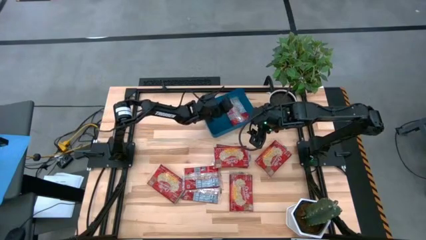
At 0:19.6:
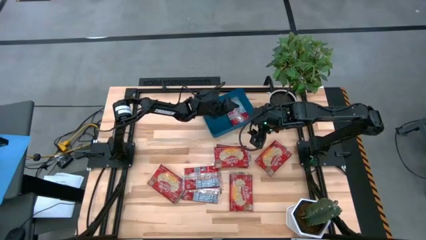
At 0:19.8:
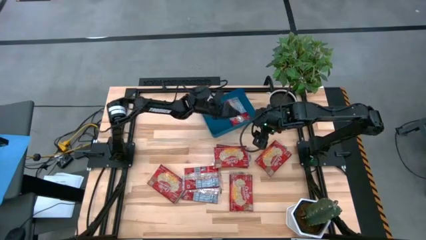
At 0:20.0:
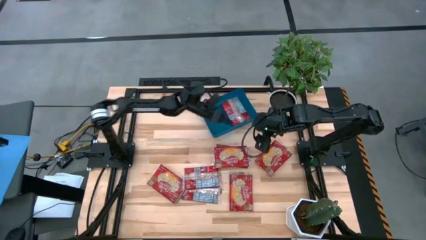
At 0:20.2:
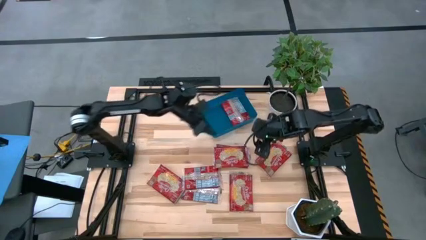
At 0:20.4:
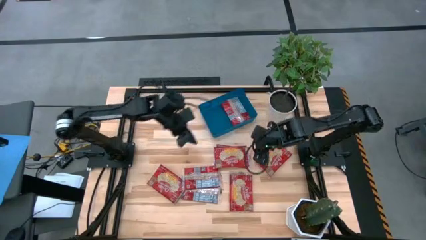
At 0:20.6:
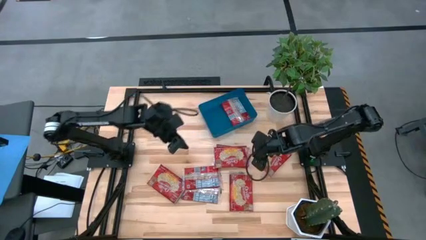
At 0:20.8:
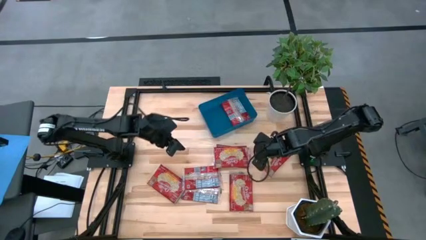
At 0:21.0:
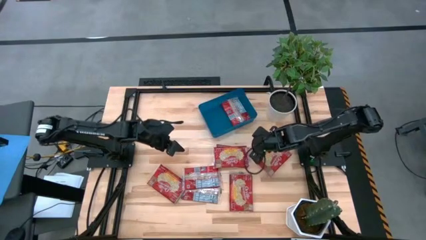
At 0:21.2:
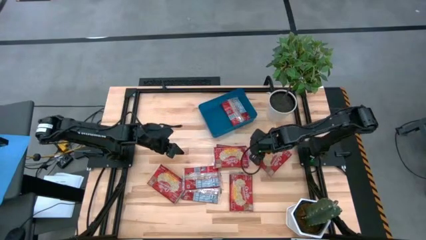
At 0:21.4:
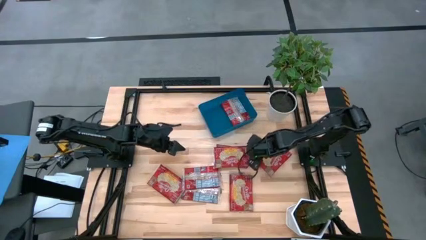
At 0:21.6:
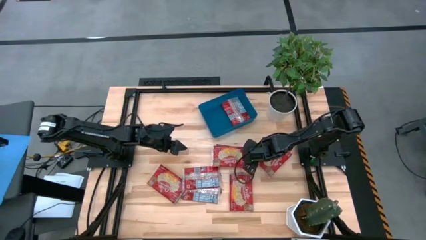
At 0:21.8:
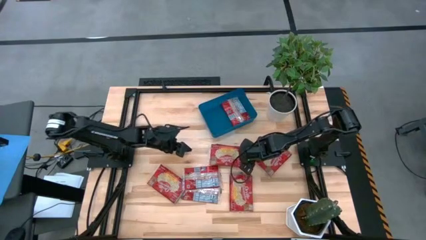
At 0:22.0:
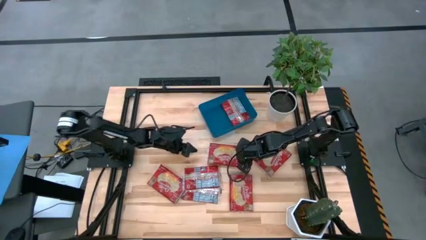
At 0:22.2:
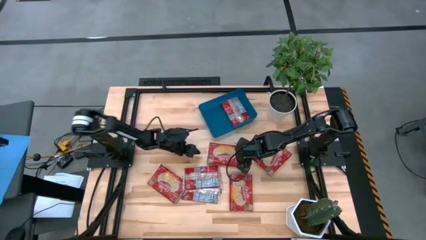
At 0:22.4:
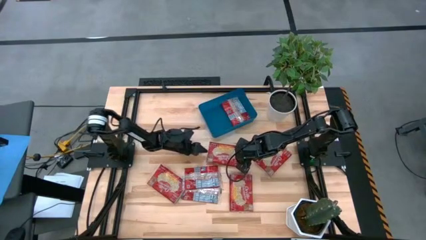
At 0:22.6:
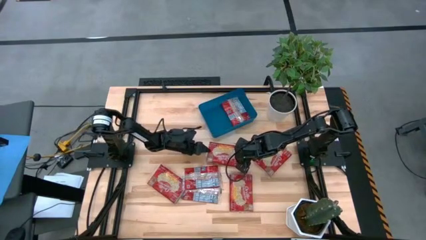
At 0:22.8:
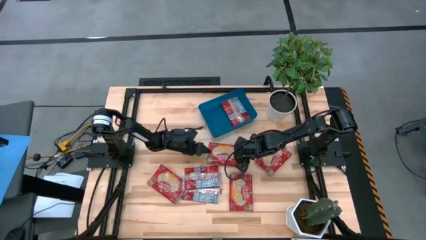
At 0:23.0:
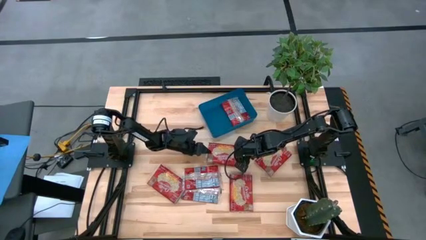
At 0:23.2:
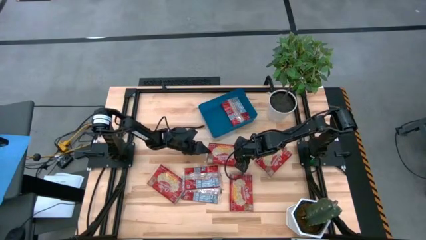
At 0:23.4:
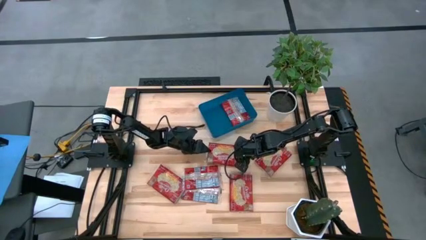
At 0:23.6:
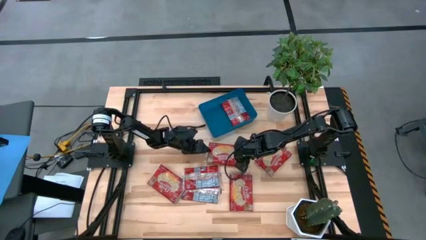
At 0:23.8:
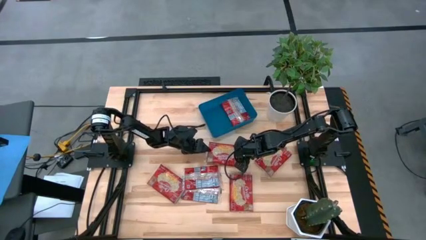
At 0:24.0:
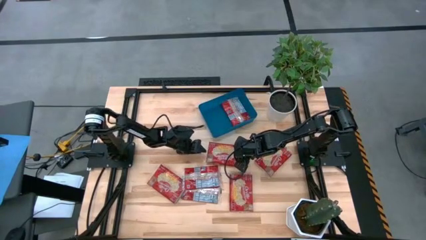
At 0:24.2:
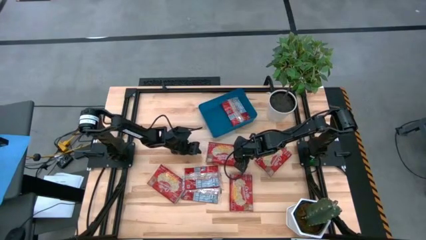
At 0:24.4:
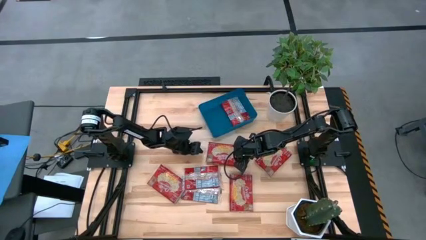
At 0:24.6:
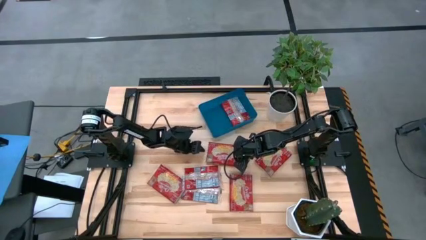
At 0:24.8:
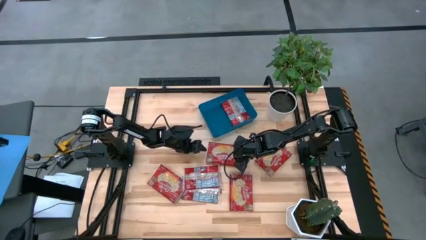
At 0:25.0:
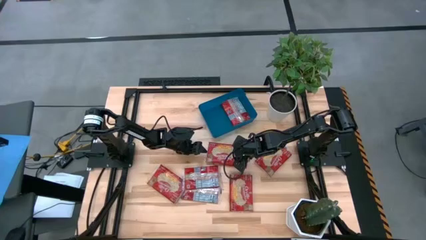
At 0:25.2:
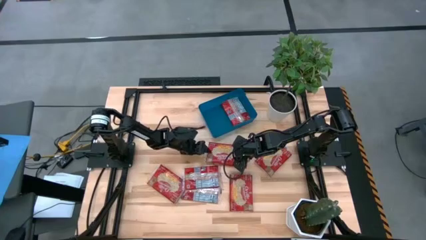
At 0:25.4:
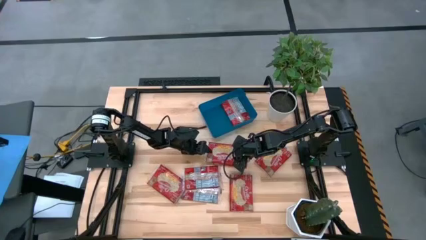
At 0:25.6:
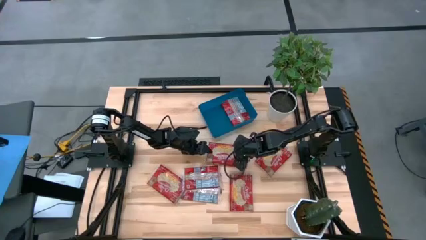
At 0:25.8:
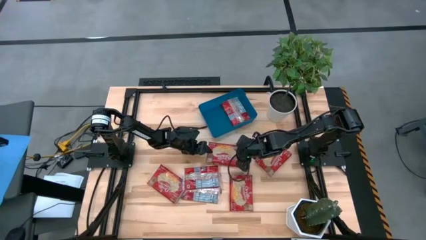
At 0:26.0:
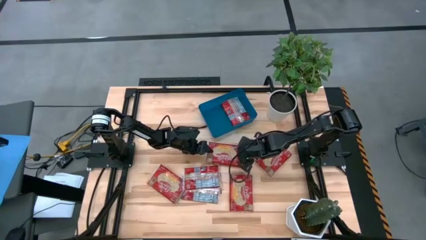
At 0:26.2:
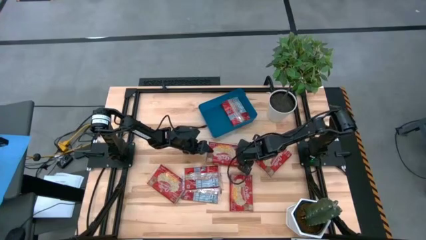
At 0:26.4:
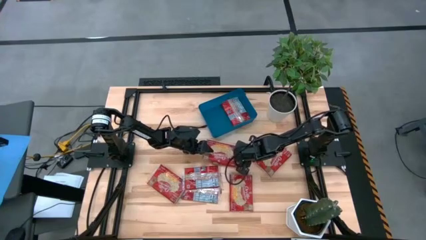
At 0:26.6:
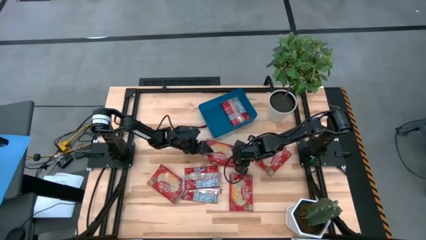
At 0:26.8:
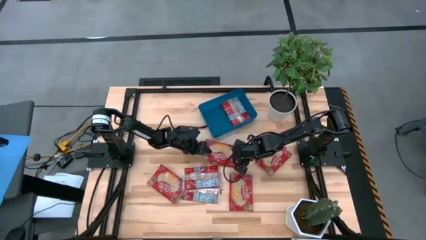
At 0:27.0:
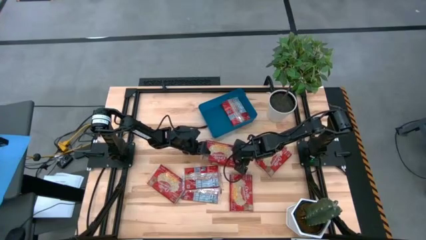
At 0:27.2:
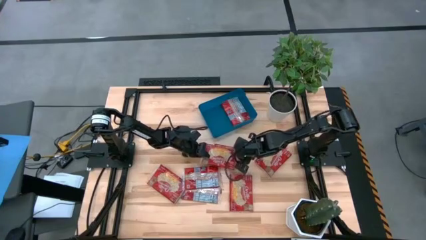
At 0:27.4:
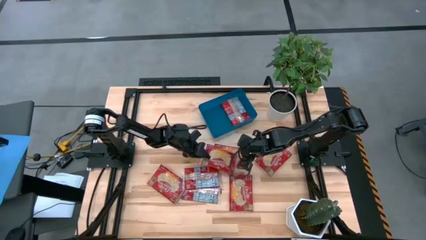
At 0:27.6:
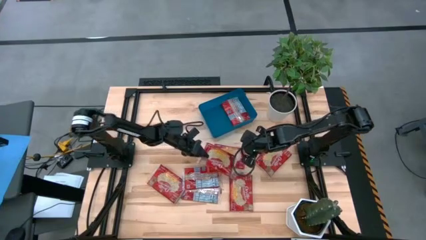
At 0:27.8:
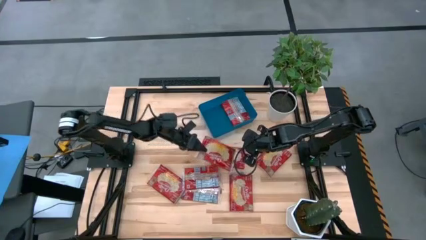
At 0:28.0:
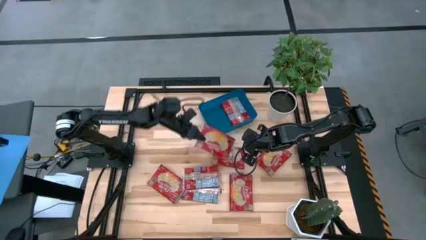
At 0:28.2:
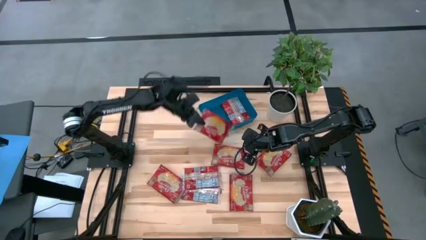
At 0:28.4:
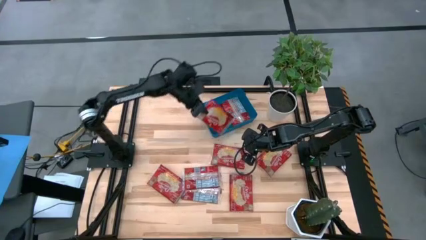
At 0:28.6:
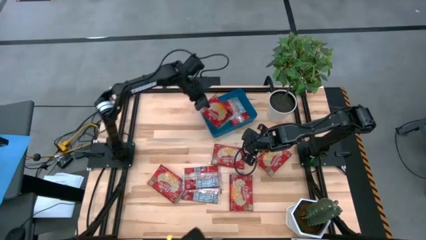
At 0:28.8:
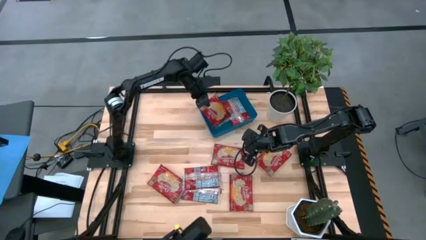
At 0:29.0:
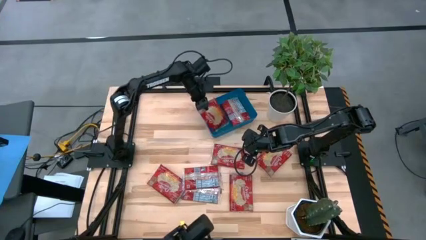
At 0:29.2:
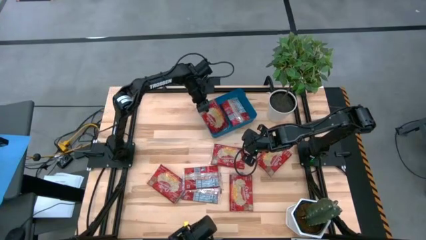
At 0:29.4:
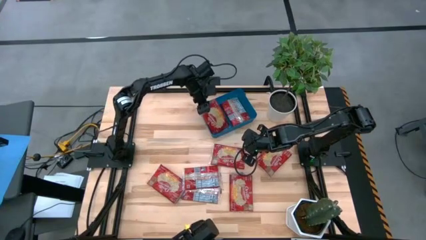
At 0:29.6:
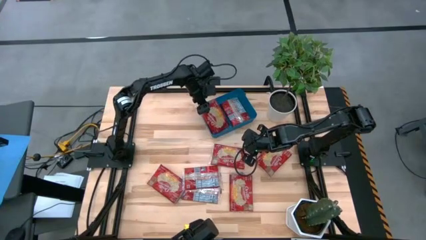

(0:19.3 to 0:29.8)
Task: Sort popcorn bags into baskets
Put the red popcorn bag into the blue bin

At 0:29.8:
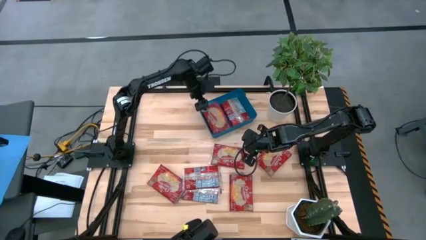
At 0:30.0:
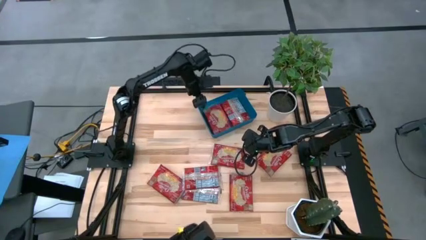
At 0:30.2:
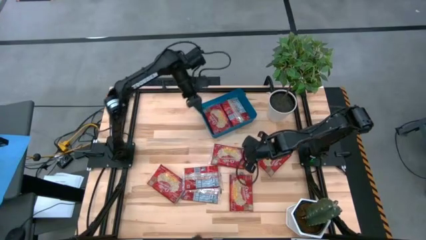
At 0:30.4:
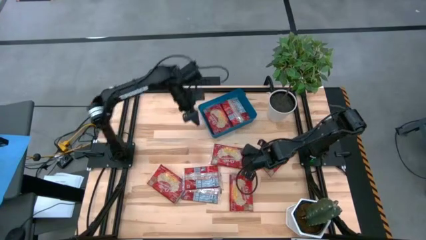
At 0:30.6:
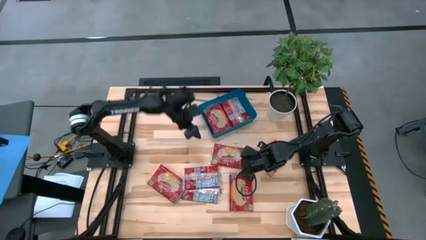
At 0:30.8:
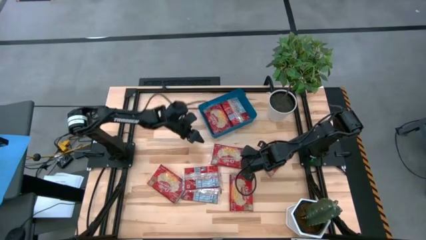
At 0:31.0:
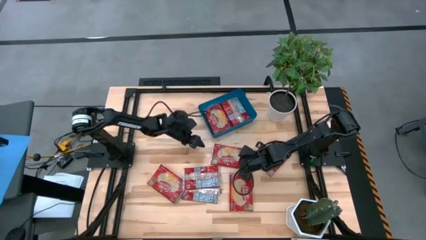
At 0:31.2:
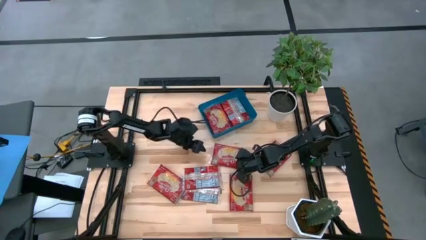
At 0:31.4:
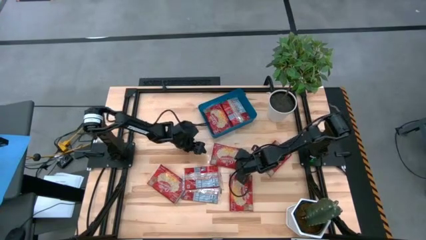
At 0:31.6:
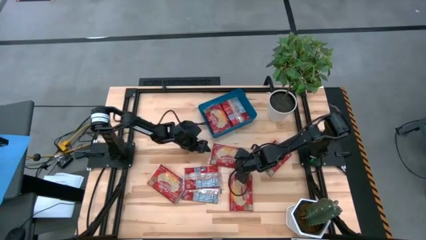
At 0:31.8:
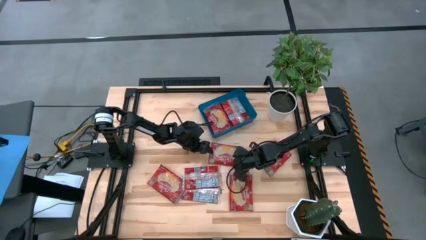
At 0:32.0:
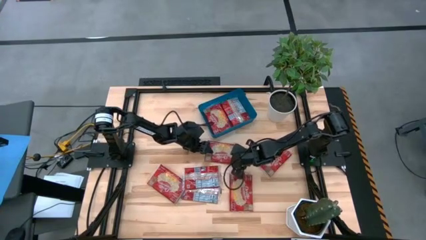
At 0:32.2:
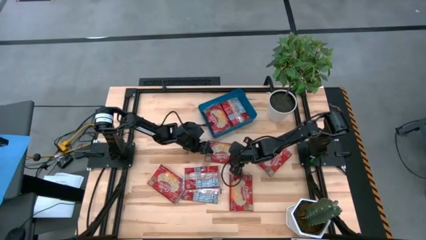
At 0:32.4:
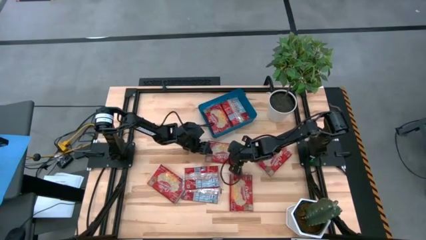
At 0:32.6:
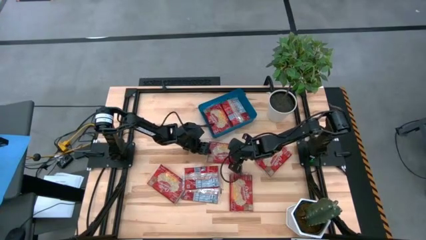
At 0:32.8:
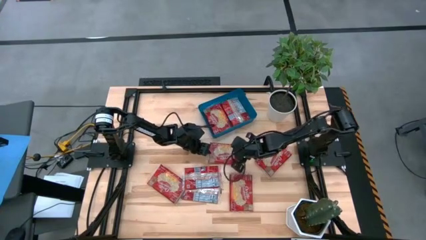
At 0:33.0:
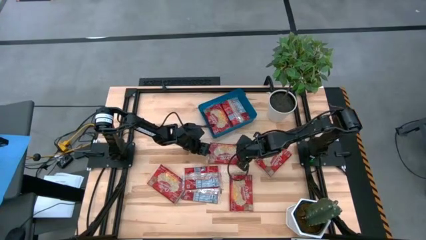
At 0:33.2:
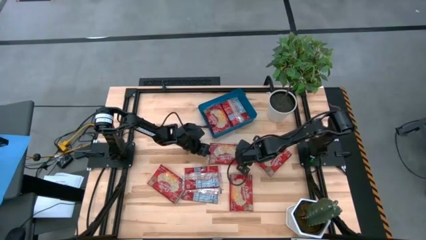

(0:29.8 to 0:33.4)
Put the red popcorn bag into the blue bin

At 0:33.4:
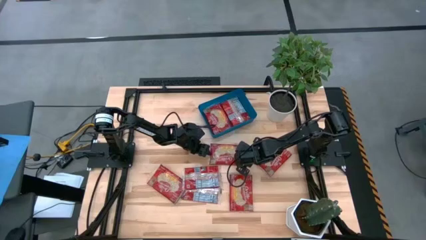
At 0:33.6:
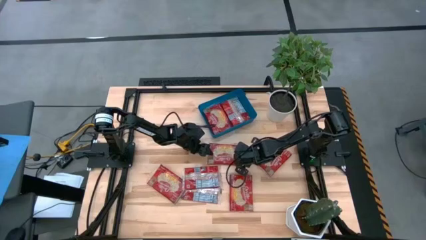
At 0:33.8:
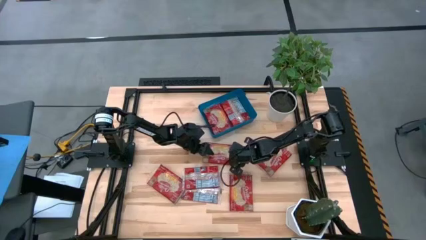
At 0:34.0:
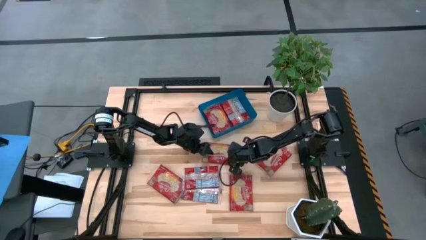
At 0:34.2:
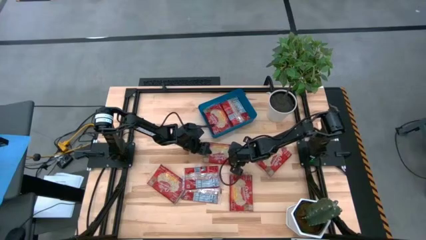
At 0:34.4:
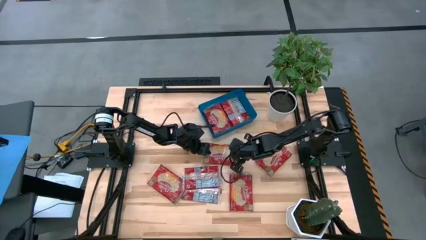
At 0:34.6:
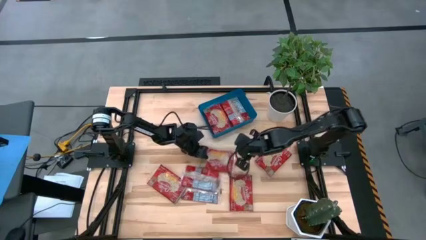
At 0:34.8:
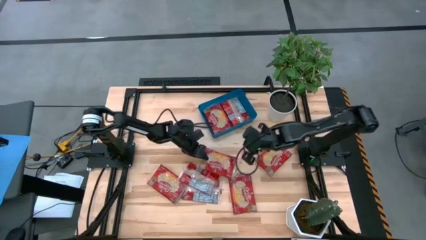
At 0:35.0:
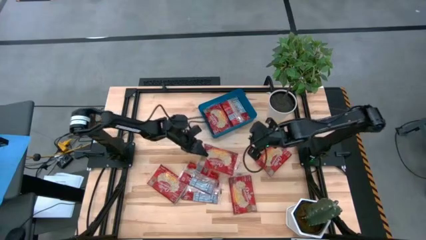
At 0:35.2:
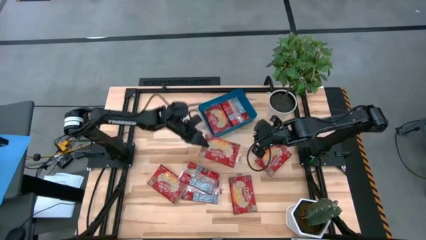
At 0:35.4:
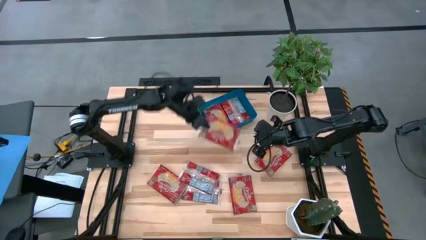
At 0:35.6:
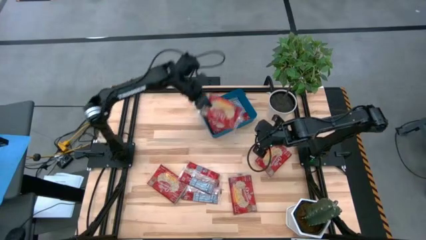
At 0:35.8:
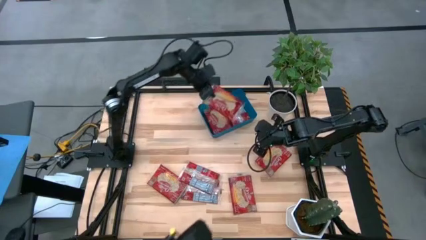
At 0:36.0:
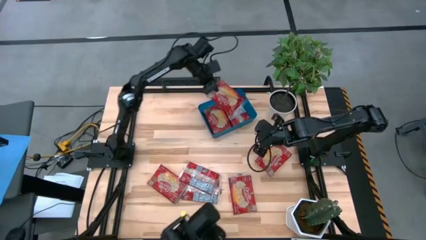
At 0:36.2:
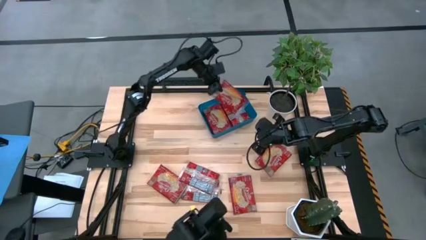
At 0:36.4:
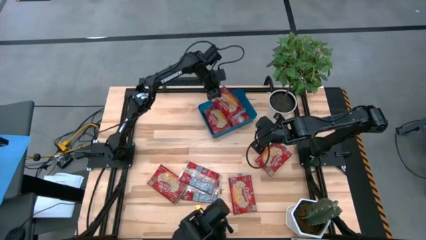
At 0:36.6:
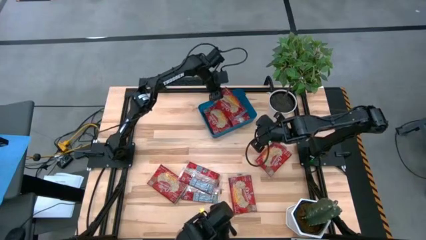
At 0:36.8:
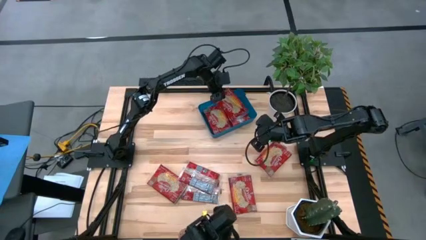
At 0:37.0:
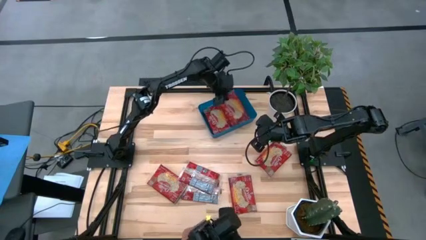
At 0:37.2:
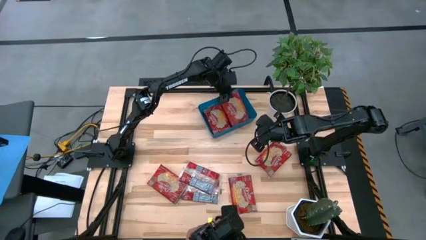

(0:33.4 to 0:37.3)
Put the red popcorn bag into the blue bin
